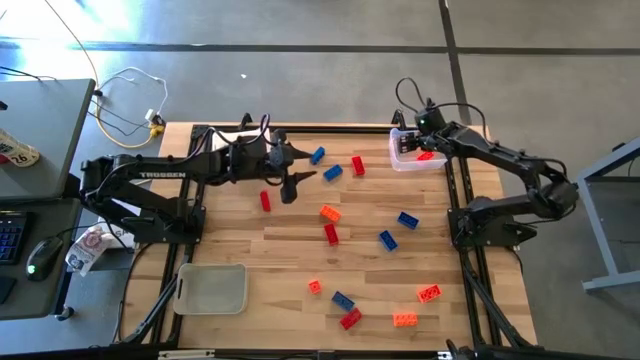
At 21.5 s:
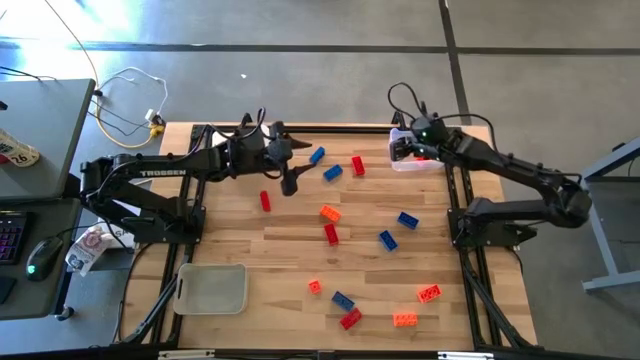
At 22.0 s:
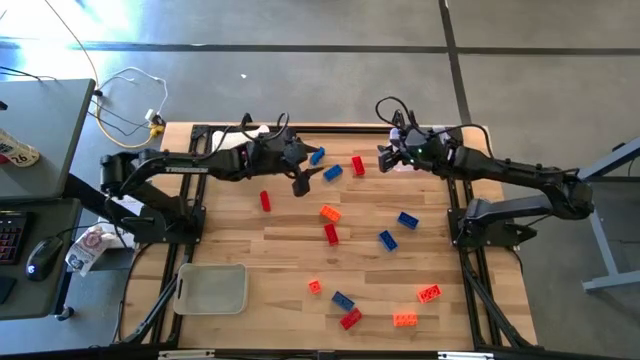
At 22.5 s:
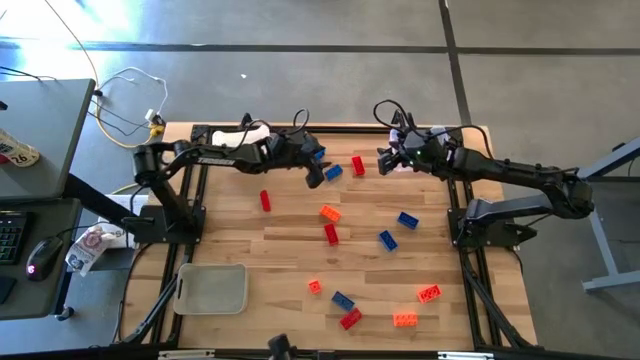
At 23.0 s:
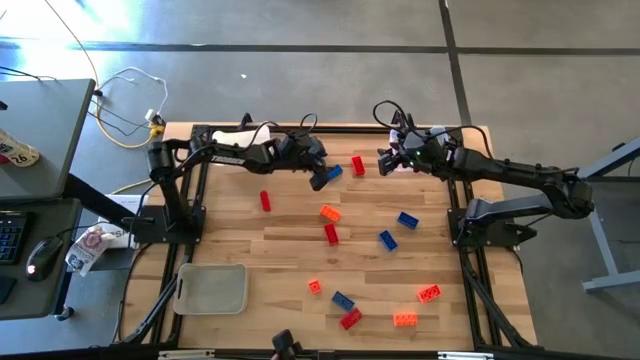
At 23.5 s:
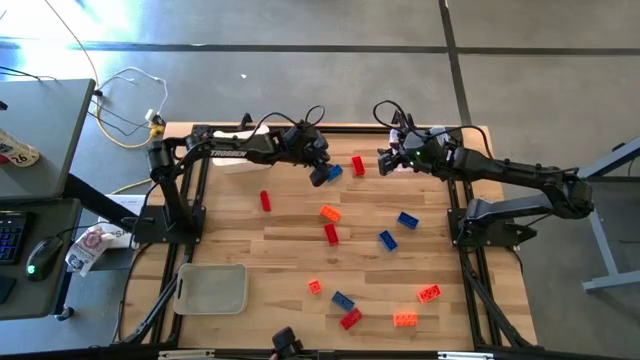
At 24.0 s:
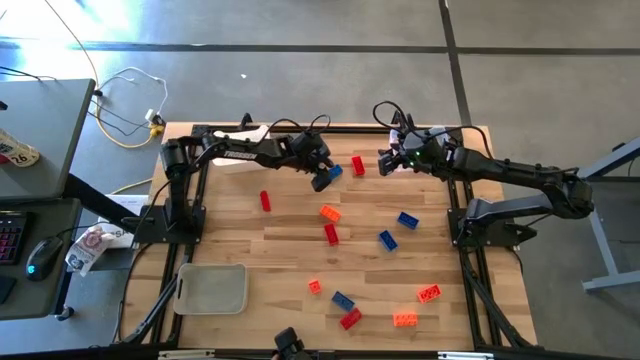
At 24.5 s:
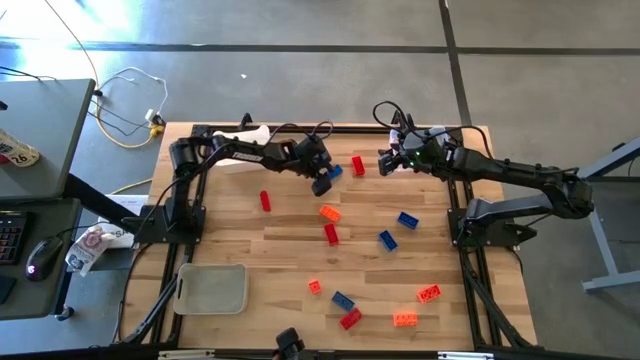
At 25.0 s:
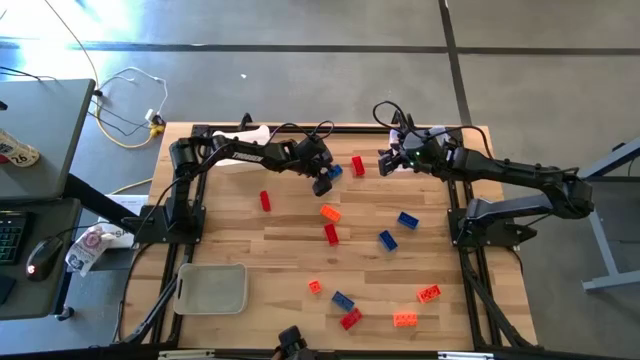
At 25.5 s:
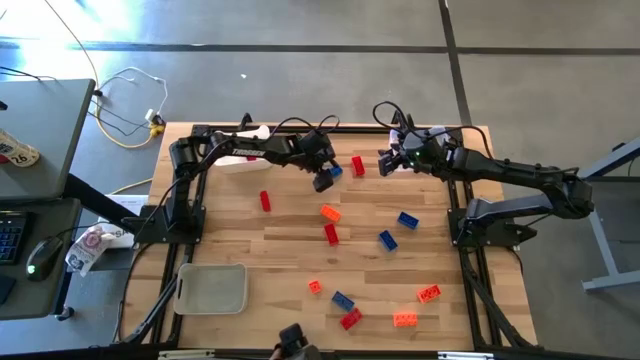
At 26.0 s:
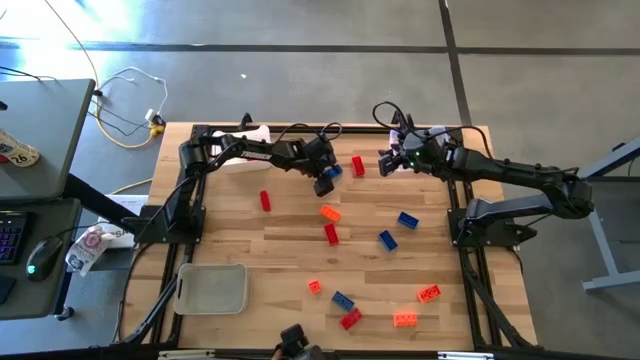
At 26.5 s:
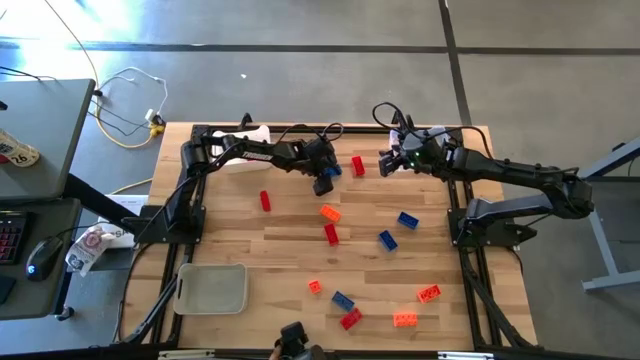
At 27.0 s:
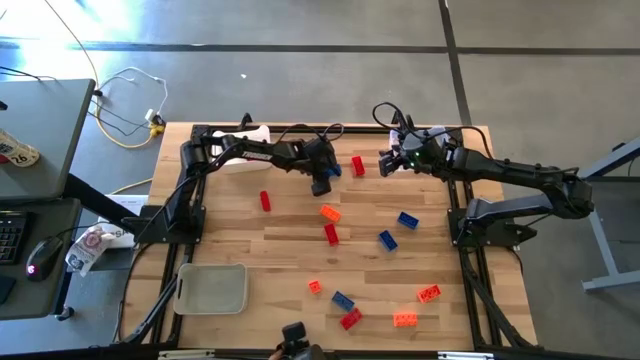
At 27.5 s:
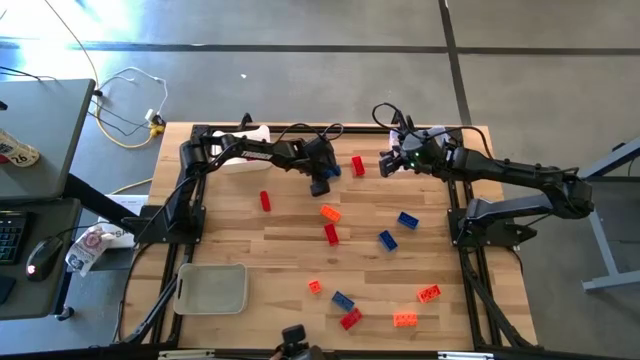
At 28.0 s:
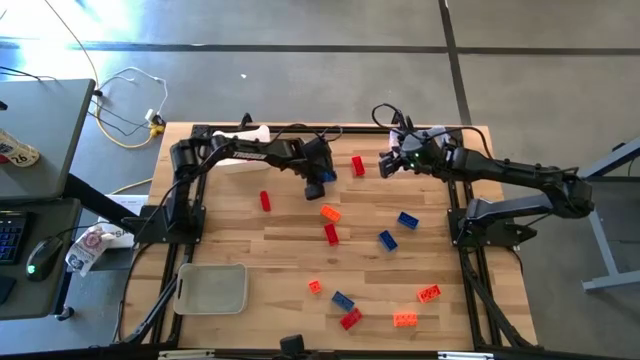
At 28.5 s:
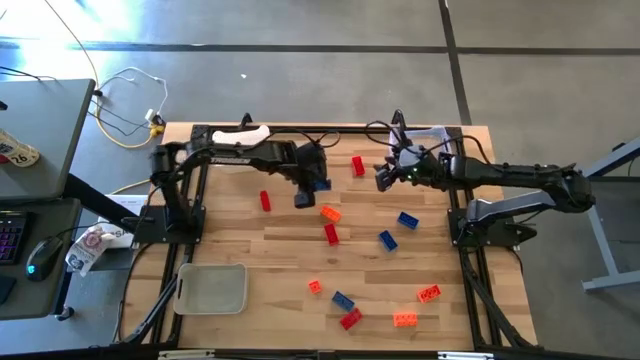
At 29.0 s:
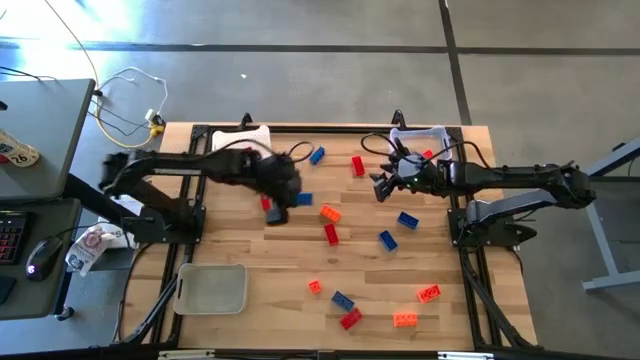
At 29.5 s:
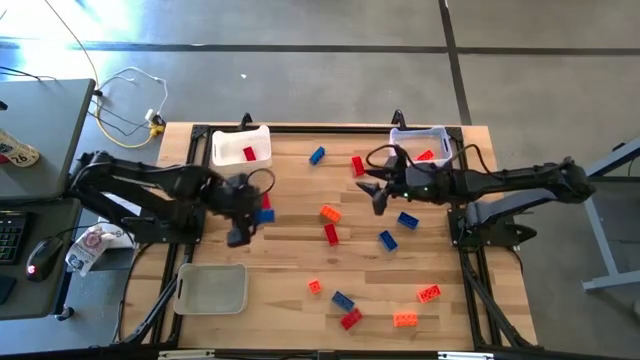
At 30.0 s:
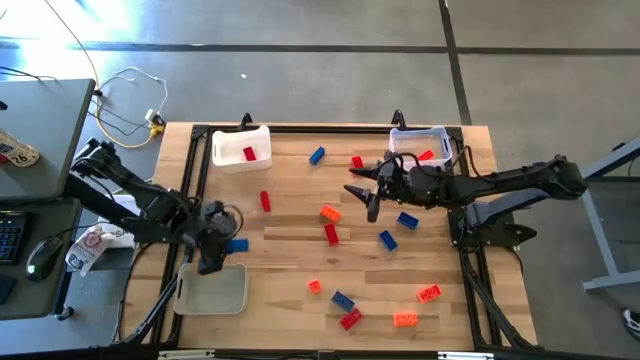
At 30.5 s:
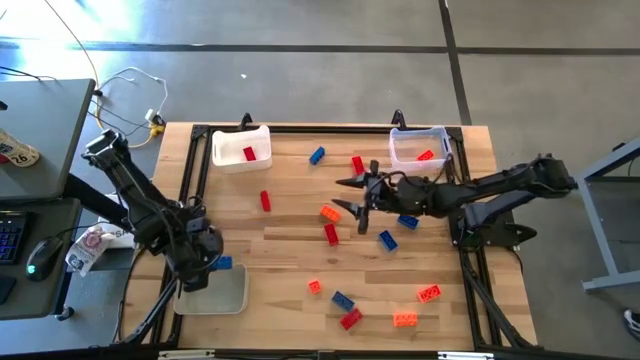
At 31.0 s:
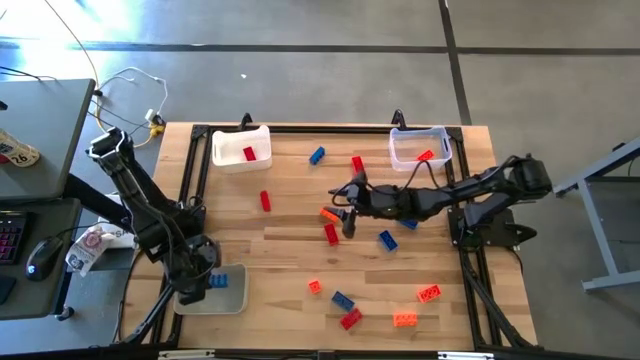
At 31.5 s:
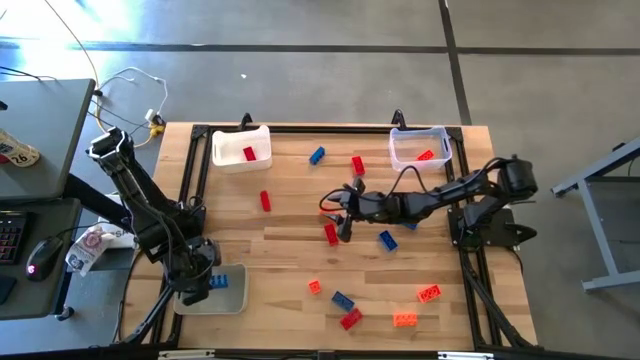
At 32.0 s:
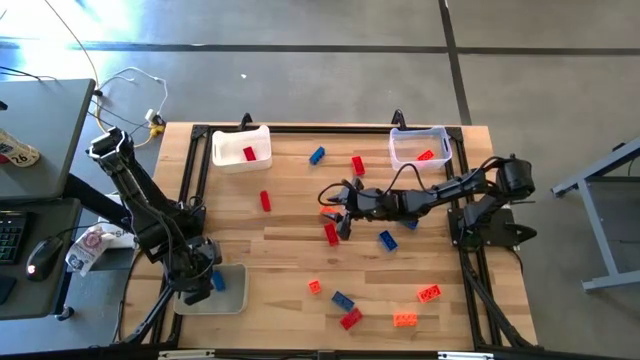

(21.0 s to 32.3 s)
Task: Sort & place blocks by color
Put the blue game piece into the gray bin

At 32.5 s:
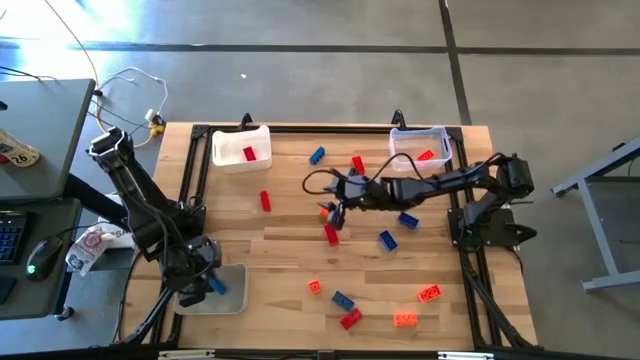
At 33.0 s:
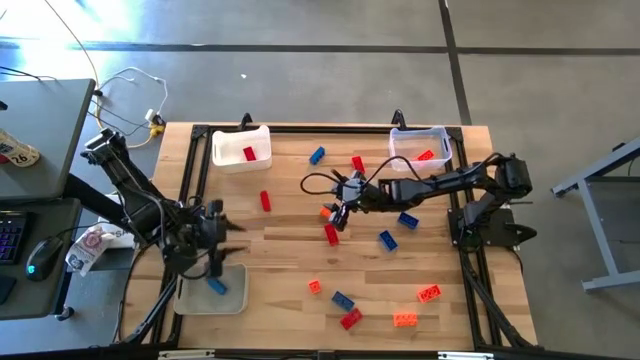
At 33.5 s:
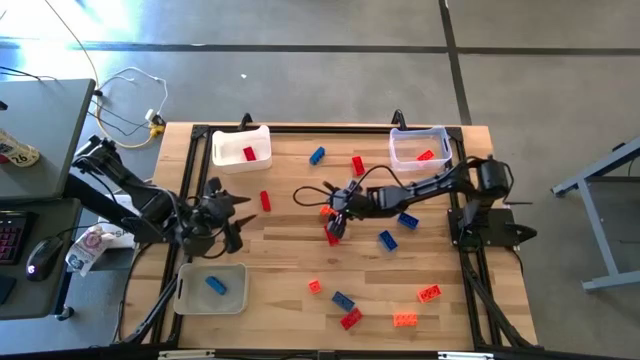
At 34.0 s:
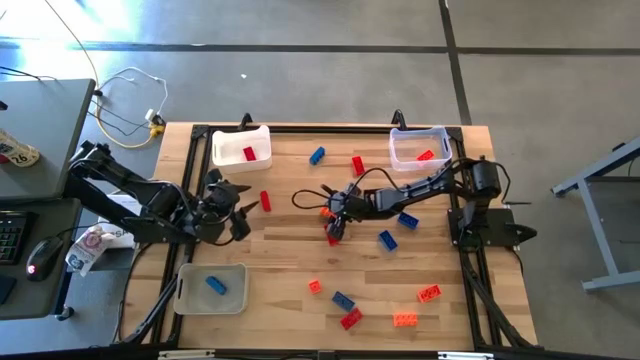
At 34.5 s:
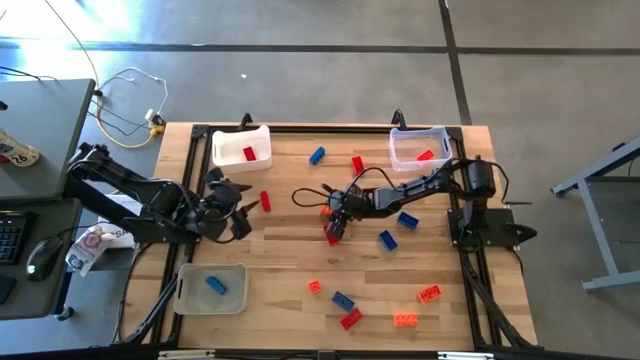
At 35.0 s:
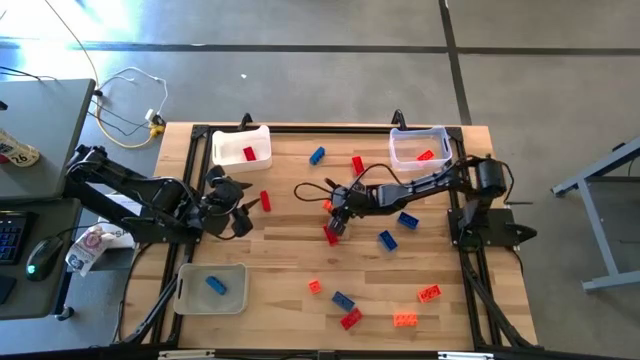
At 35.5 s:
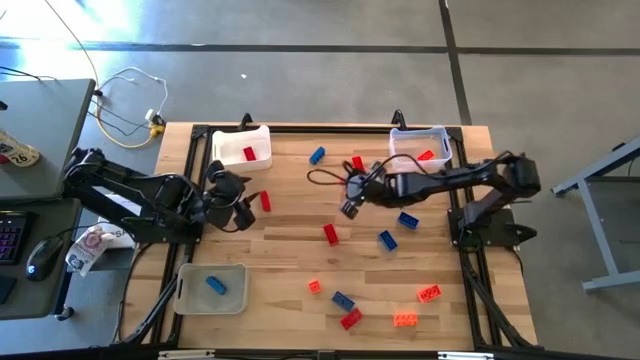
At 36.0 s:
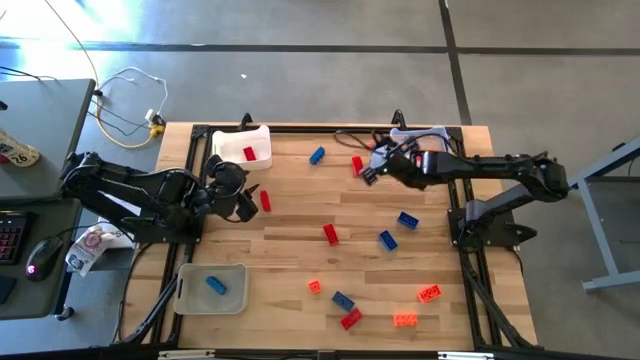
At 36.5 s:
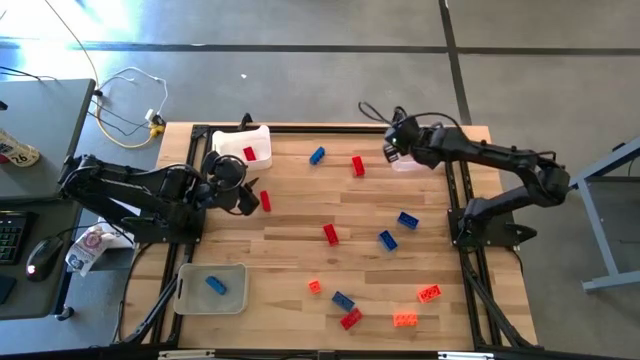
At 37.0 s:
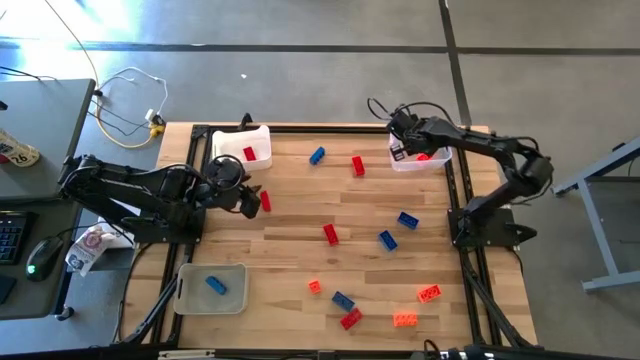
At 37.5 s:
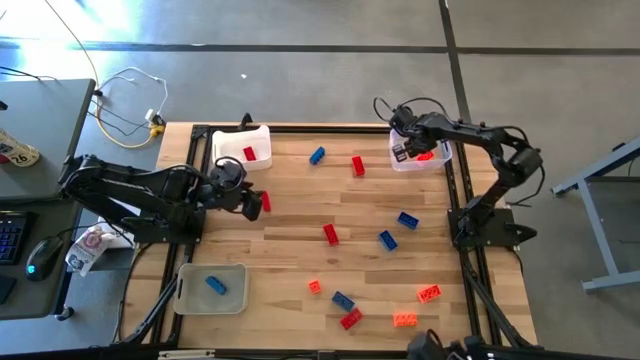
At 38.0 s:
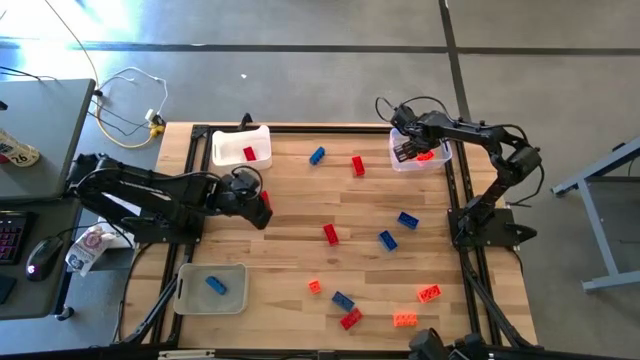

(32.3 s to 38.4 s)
Put the orange game piece into the transparent bin

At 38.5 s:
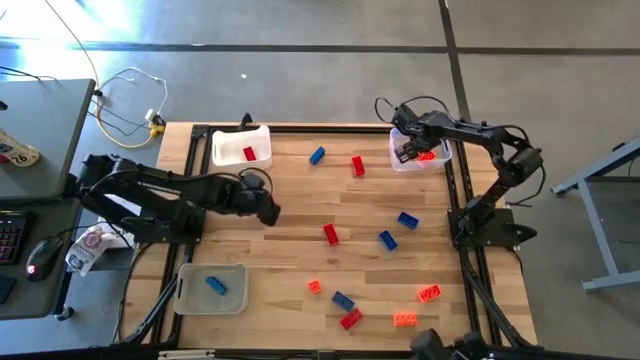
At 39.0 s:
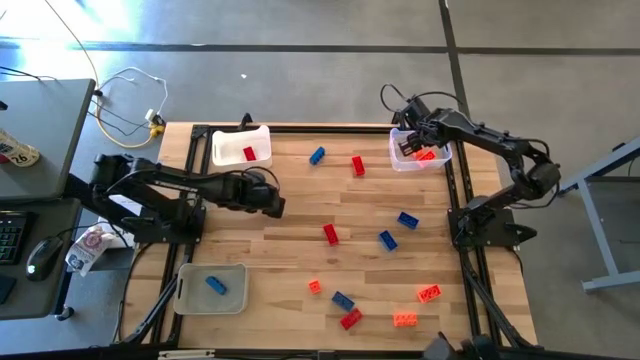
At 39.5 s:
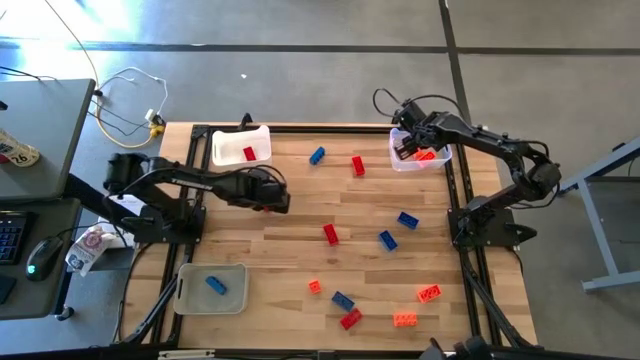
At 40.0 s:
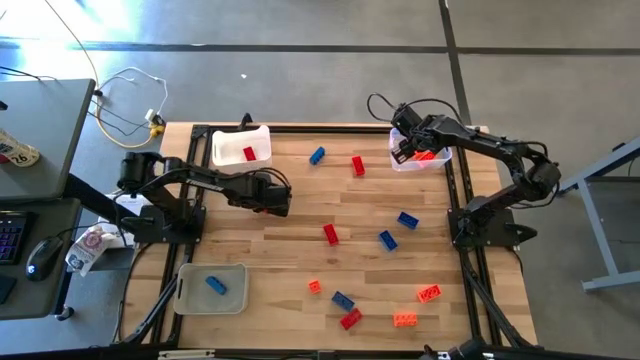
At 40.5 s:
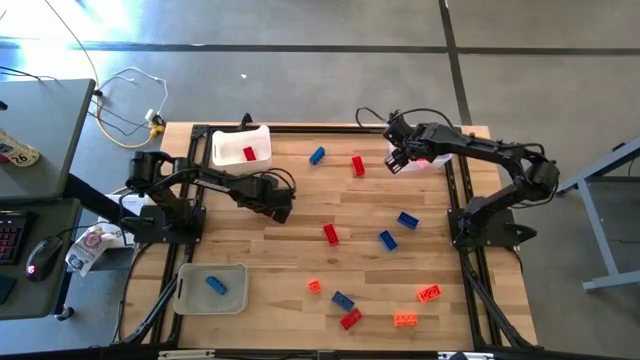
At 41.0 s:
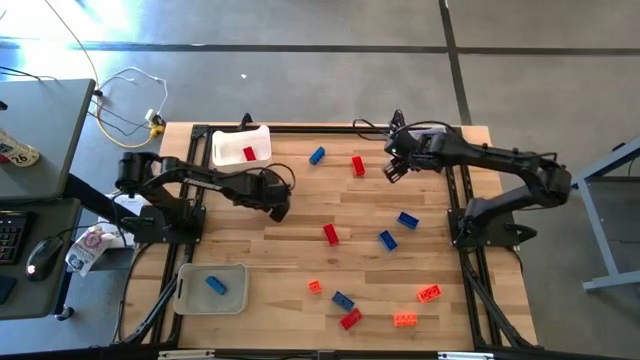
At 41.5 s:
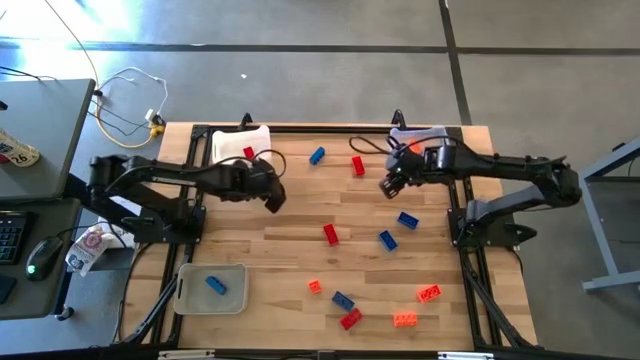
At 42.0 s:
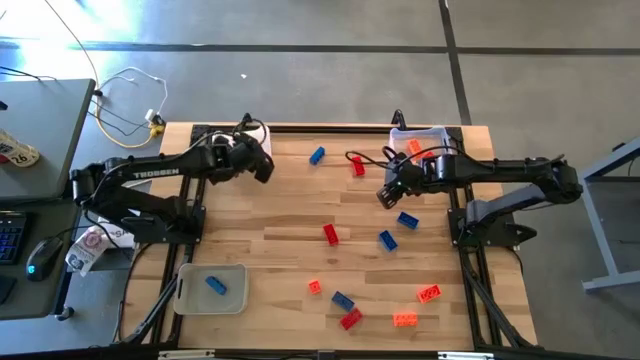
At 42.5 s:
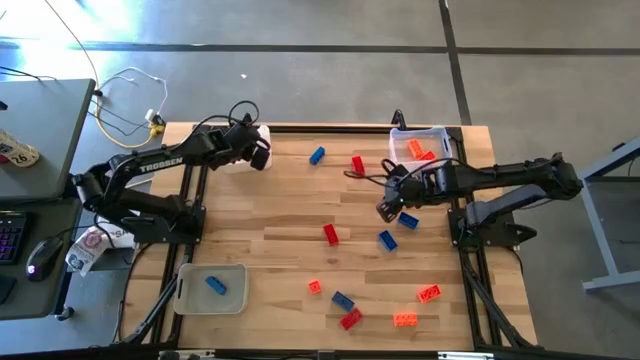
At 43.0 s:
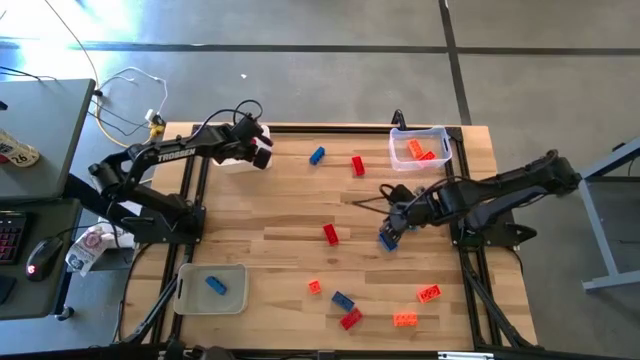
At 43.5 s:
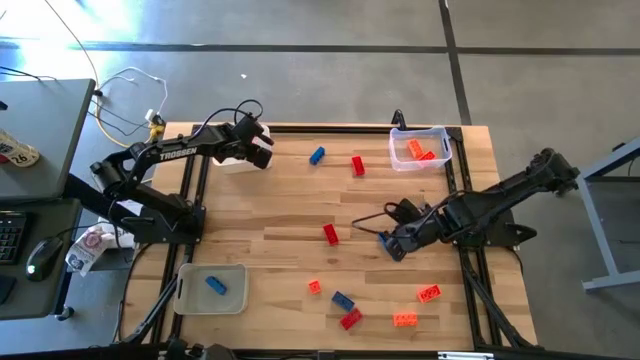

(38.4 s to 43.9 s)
Put the red game piece into the white bin
